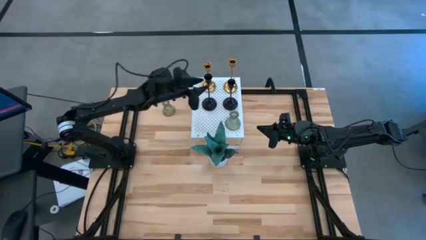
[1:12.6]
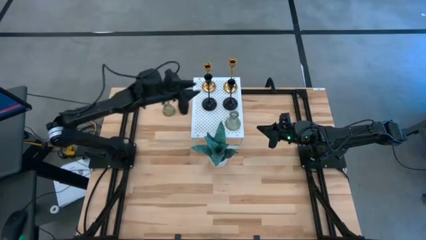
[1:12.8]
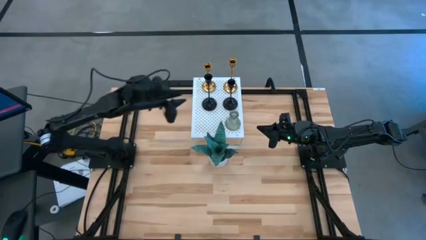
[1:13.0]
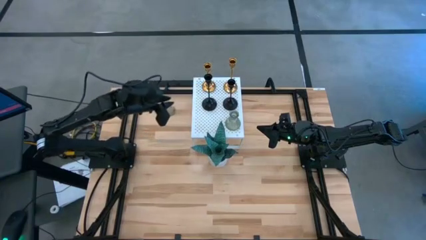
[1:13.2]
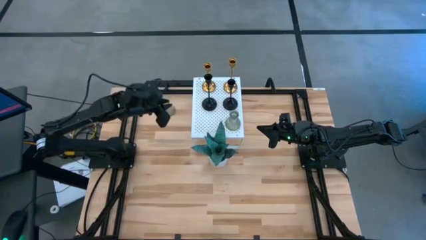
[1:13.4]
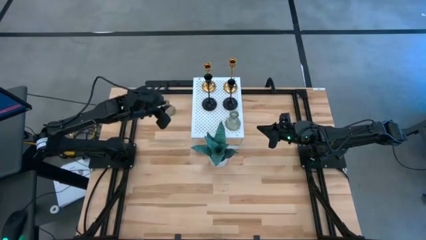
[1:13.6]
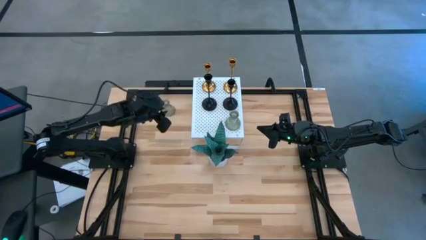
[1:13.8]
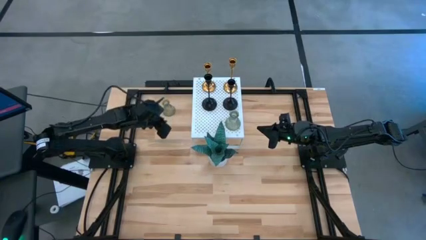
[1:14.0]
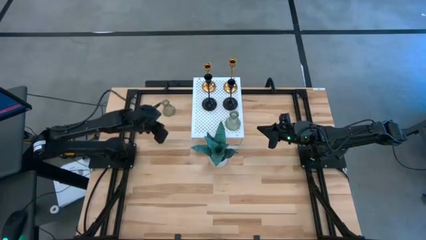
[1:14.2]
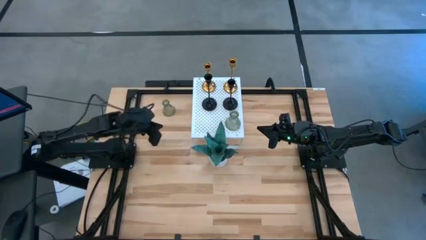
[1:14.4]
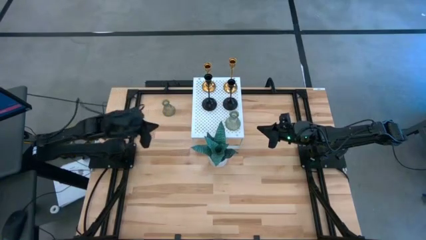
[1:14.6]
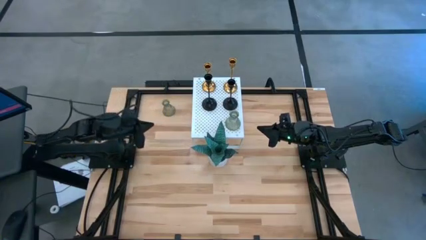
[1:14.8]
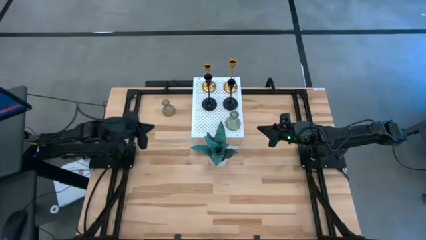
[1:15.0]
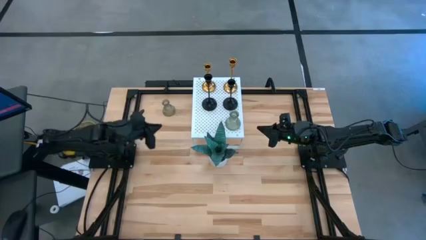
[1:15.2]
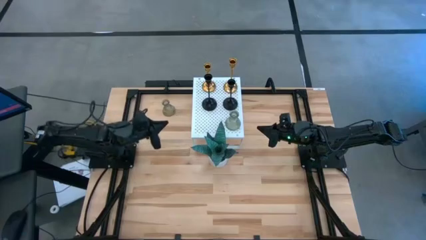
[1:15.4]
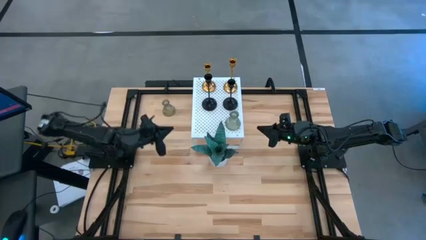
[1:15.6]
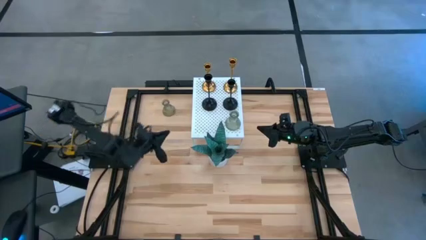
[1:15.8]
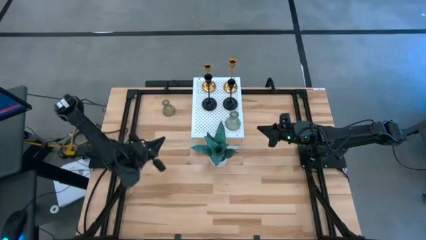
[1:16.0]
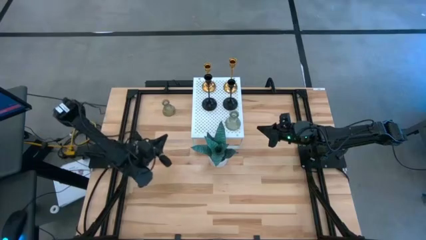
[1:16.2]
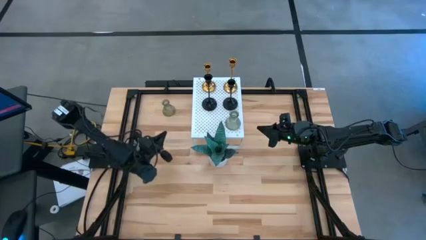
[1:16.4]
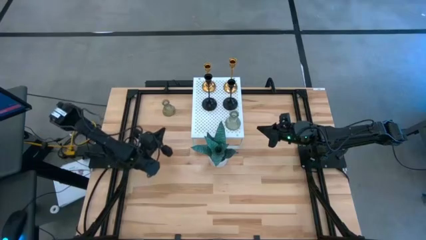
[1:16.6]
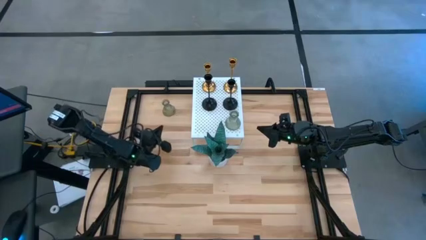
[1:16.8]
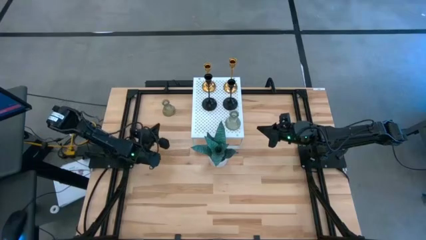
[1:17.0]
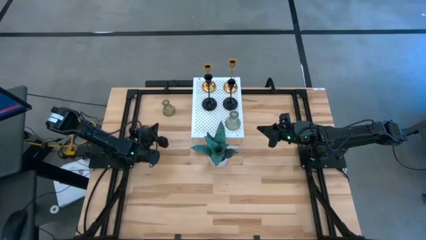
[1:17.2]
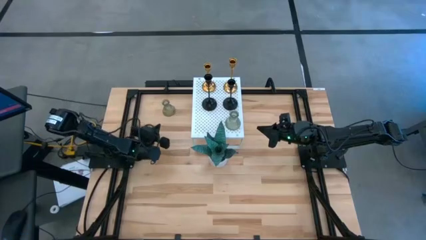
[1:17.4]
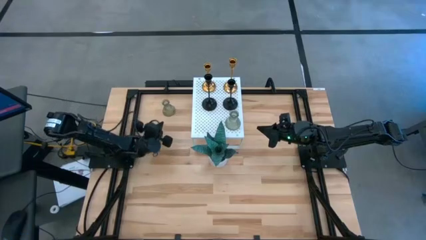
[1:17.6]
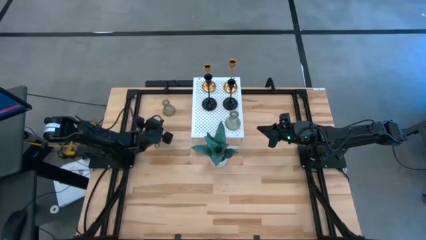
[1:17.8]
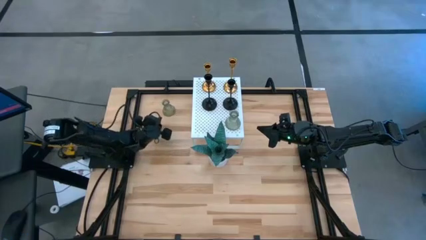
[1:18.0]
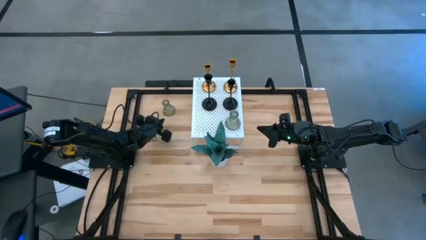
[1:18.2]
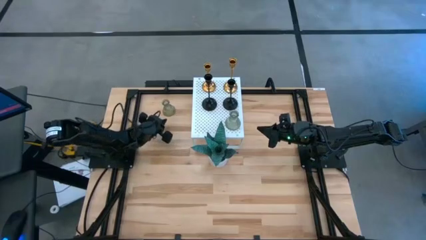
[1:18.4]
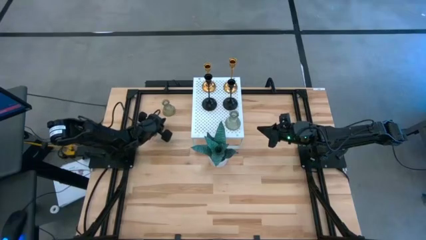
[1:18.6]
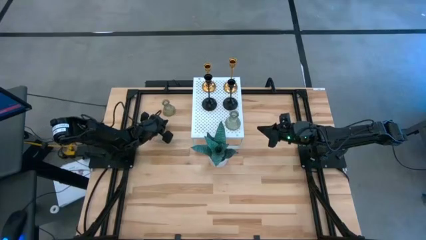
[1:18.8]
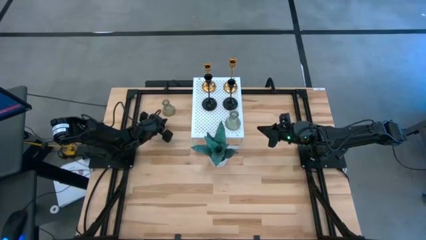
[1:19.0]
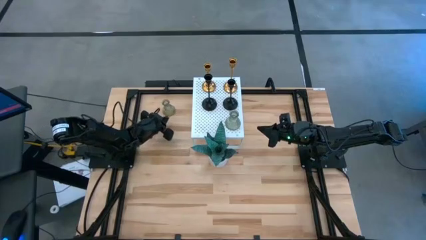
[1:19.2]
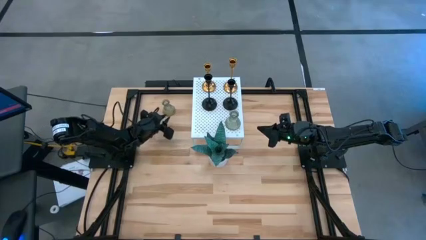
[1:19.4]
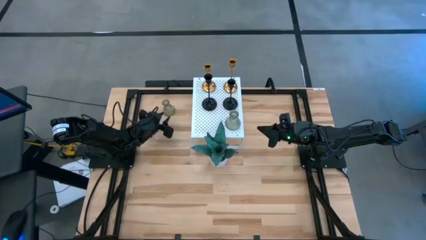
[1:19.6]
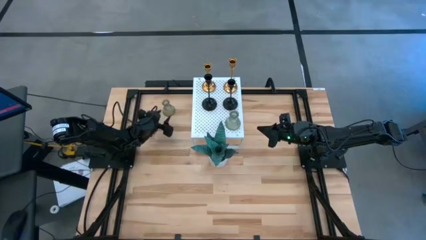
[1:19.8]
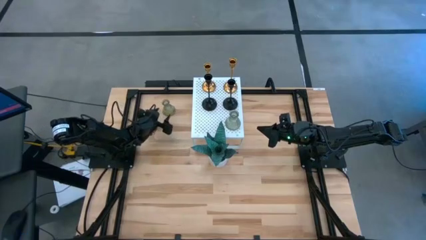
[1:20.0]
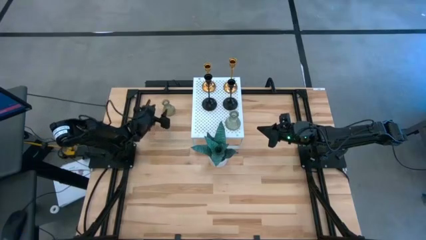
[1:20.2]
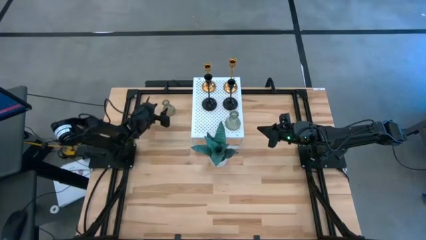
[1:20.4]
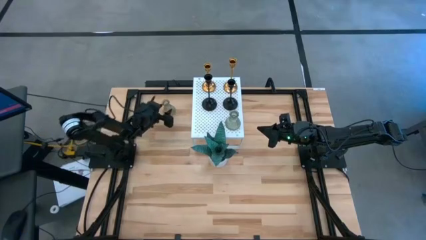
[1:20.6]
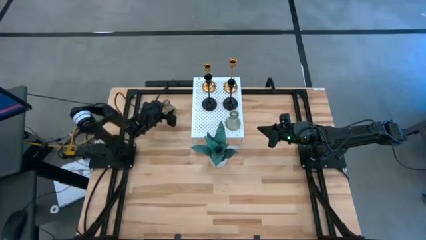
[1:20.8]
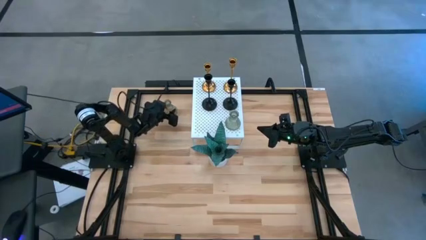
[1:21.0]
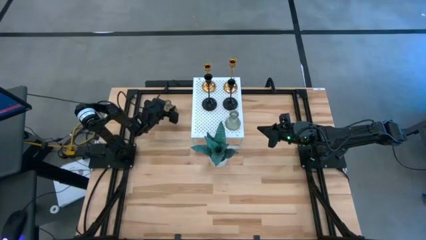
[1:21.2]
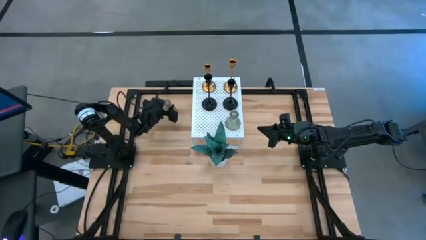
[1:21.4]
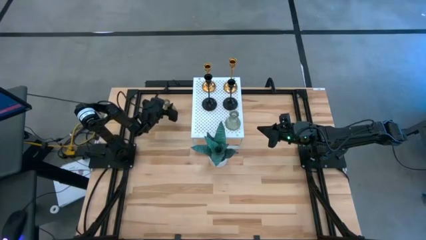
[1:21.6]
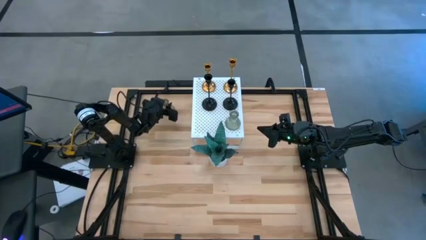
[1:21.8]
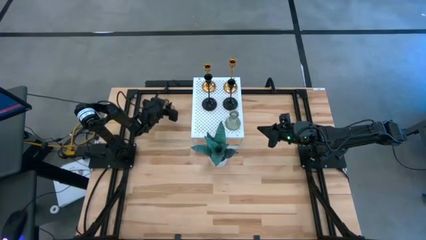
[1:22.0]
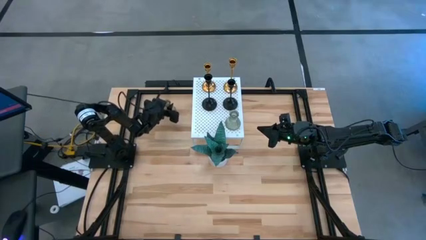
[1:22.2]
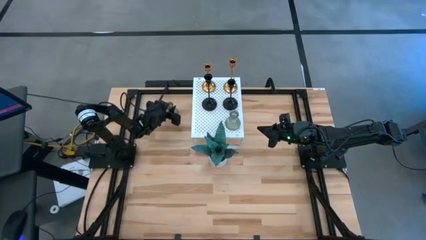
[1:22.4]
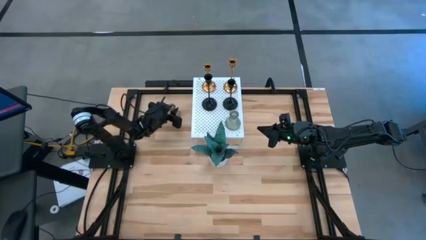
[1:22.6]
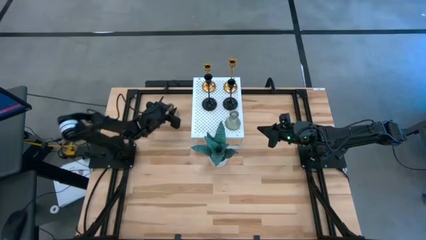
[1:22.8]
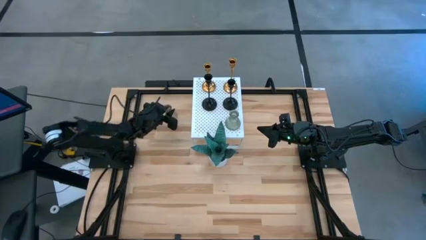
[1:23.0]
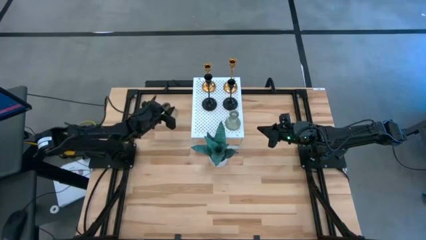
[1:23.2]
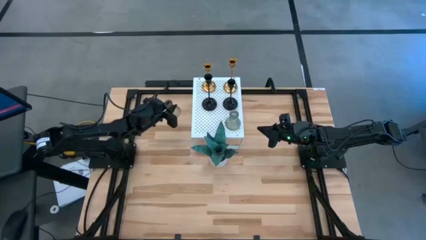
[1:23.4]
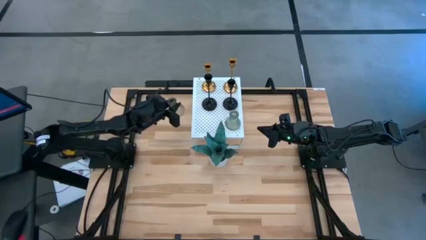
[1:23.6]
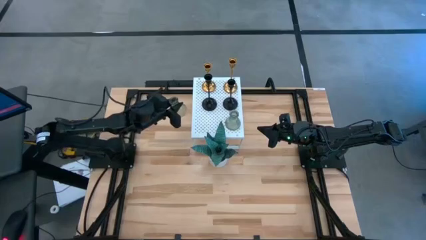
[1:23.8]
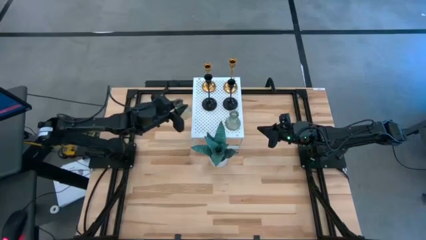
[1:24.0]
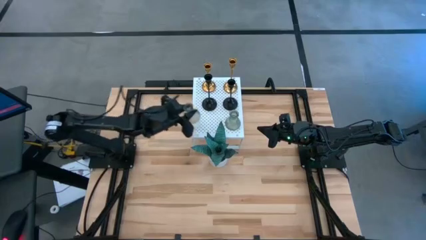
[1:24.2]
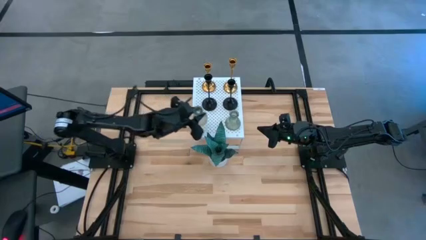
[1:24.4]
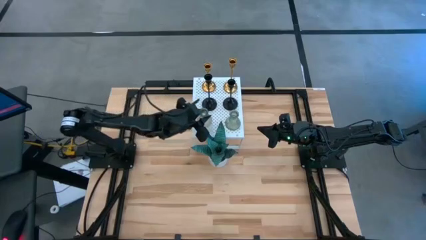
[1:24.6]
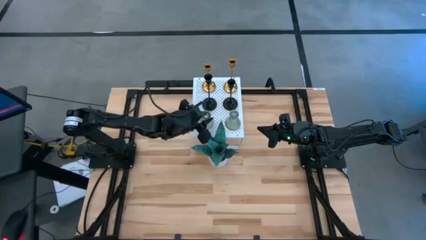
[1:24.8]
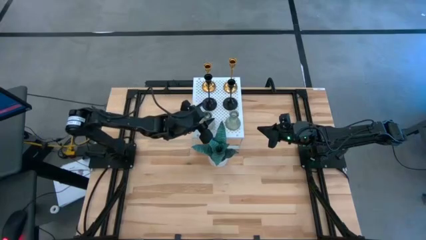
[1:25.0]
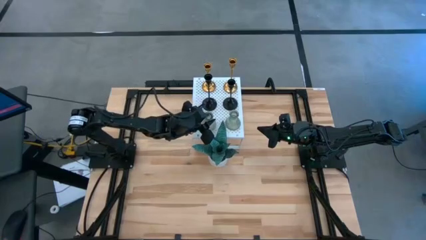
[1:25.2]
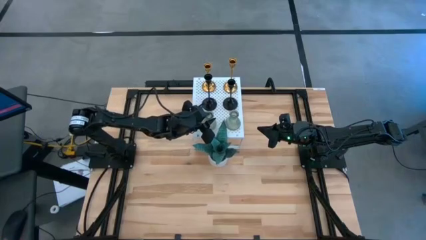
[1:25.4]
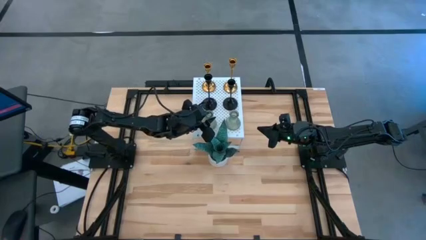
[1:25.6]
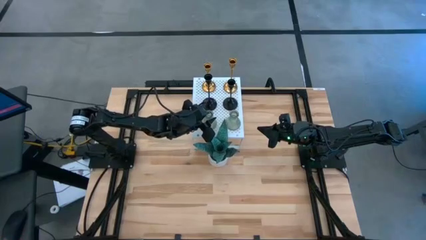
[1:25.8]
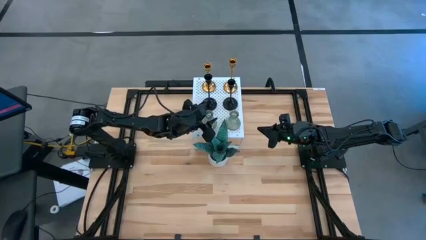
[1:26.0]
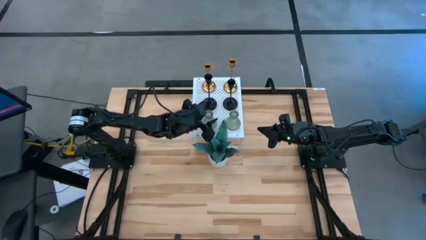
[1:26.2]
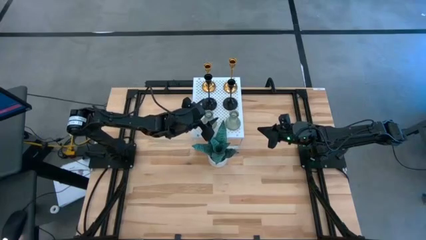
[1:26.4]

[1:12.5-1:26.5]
Task: Pick & Place candle stick holders
Put the transparent candle holder on the shelf aligned with the other transparent candle holder
